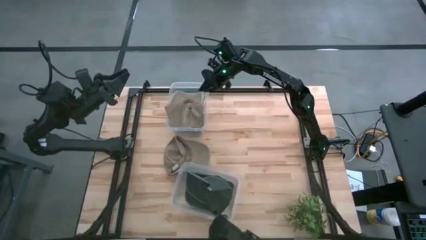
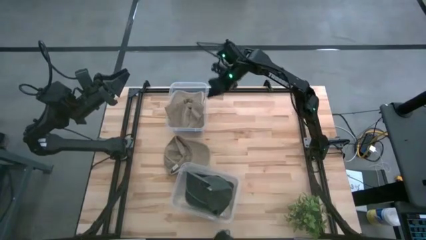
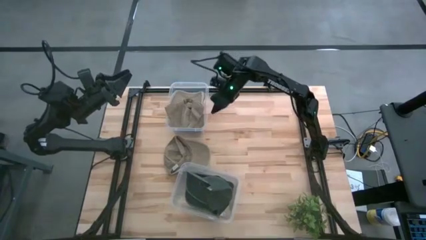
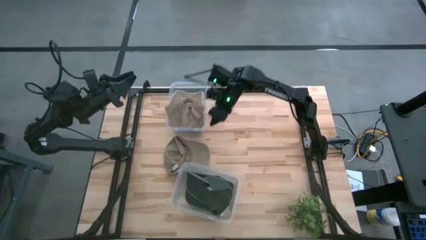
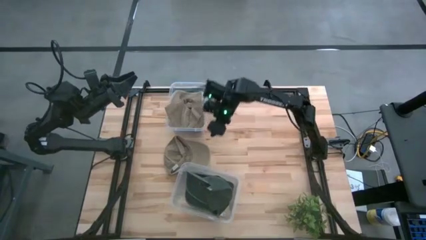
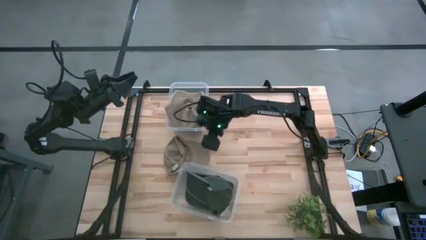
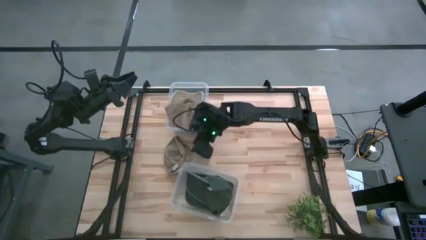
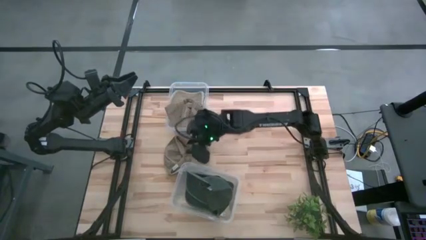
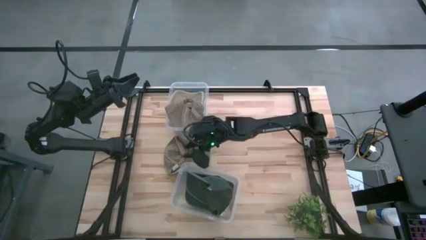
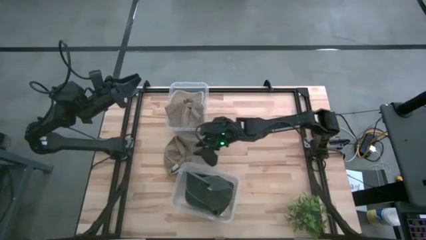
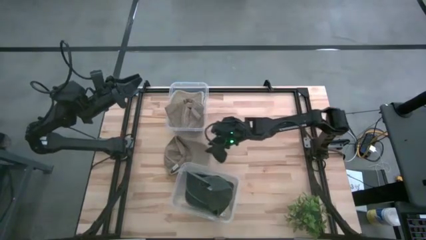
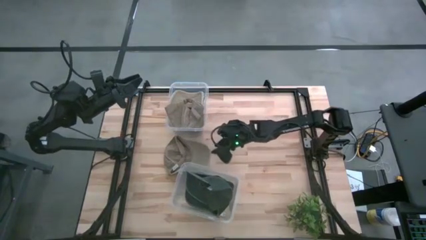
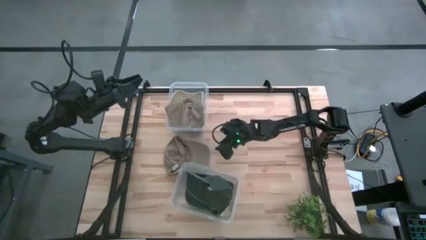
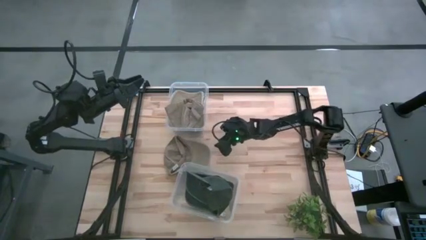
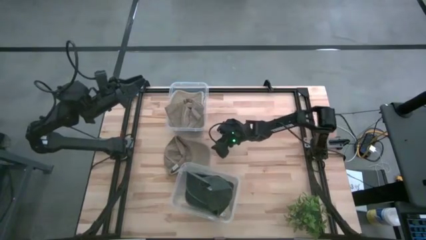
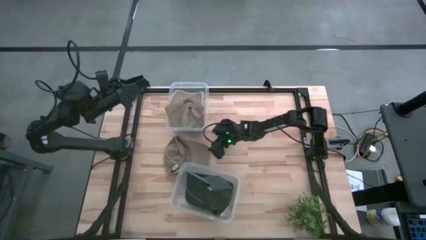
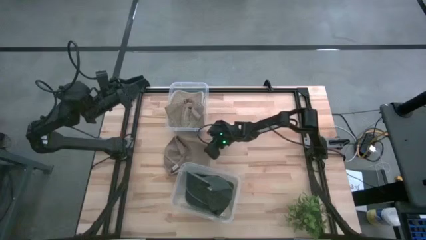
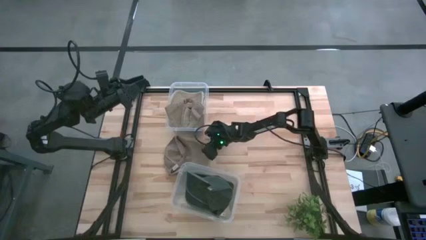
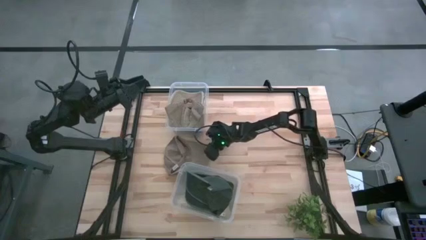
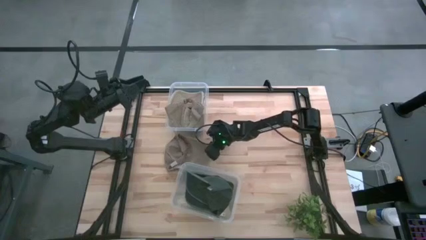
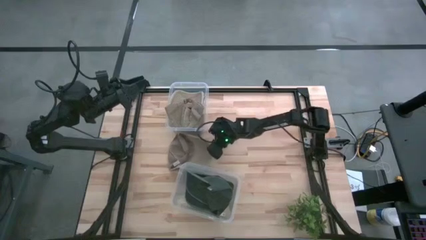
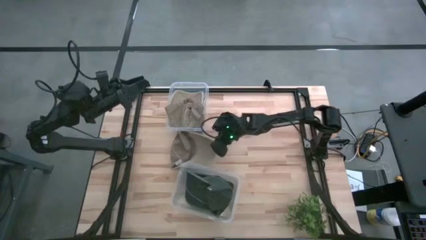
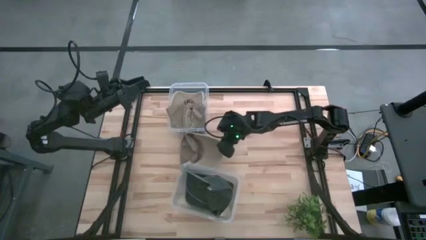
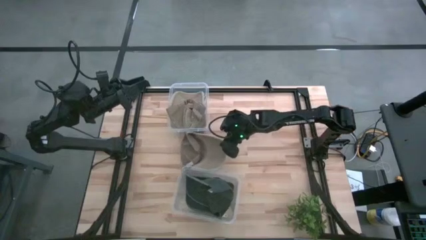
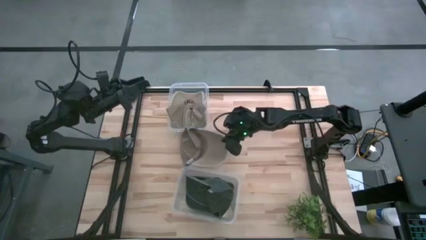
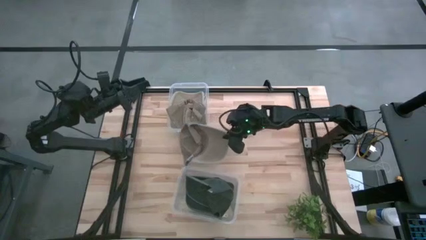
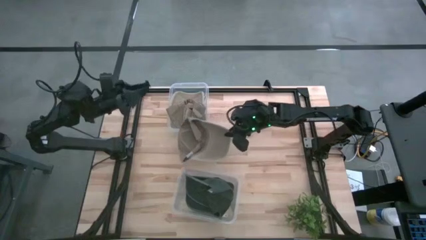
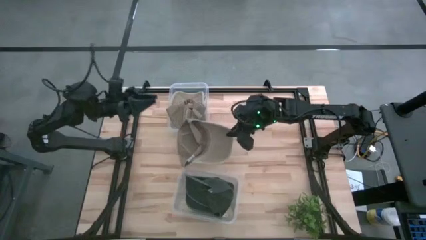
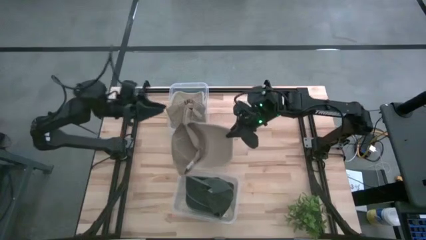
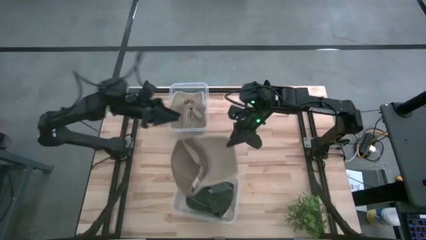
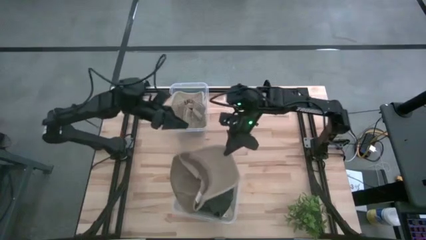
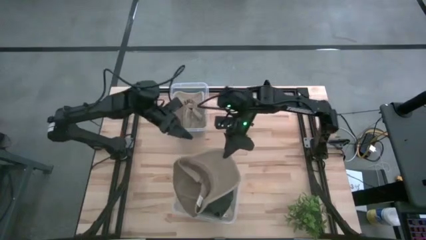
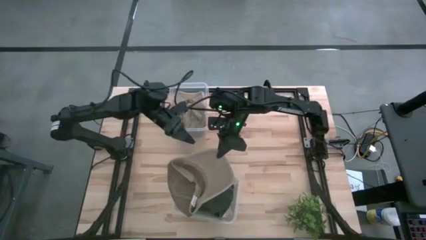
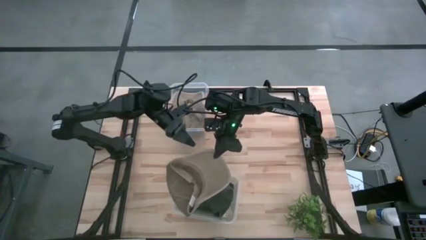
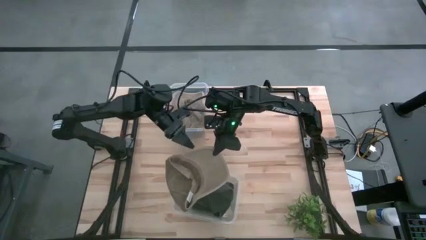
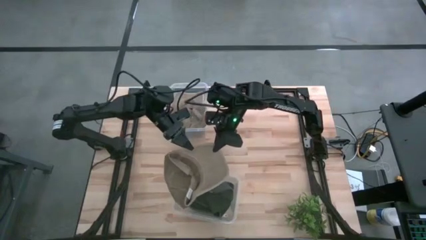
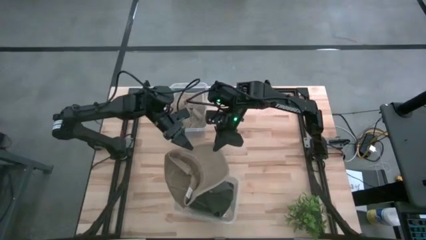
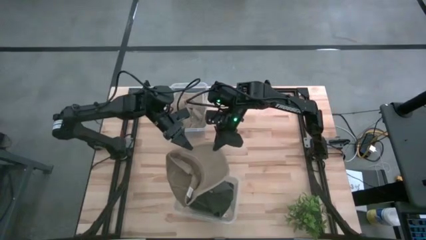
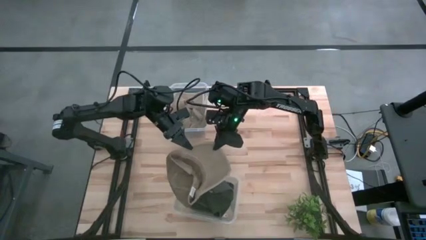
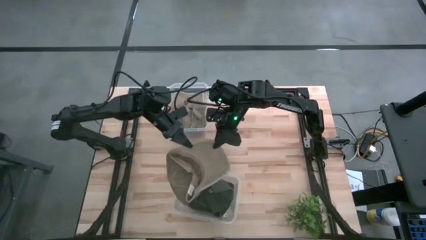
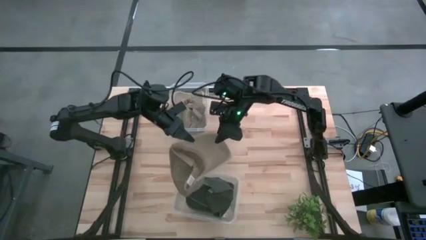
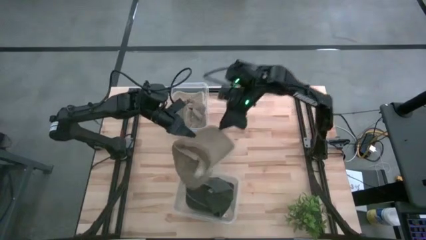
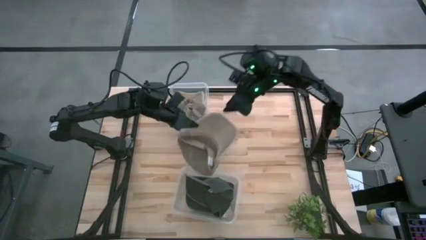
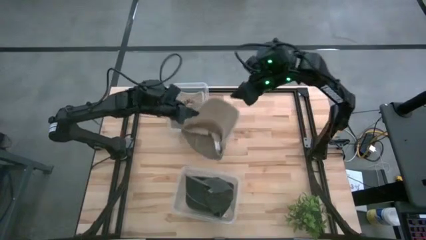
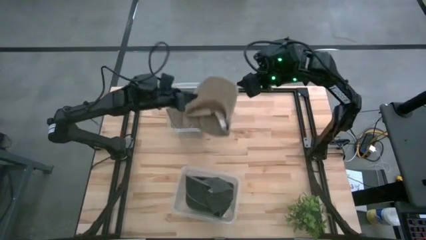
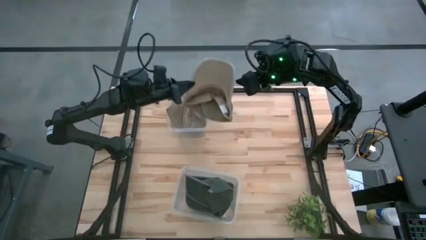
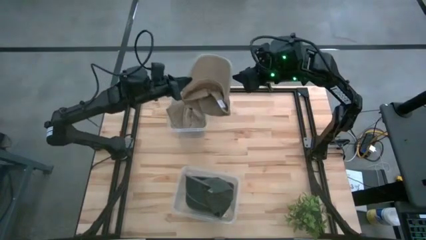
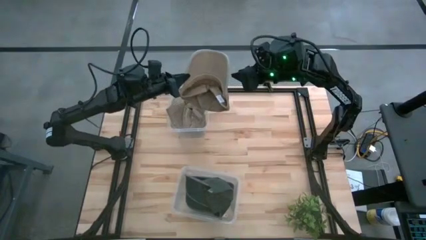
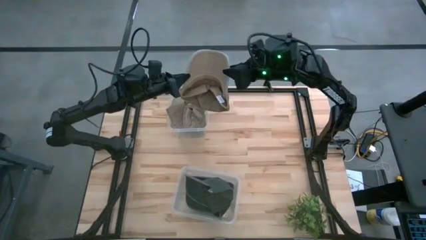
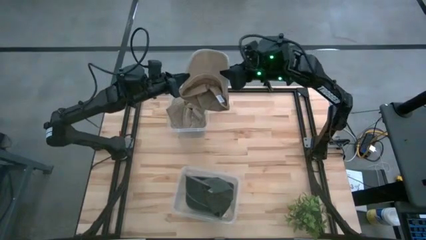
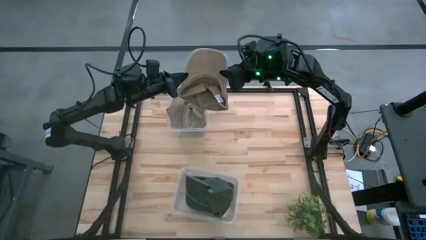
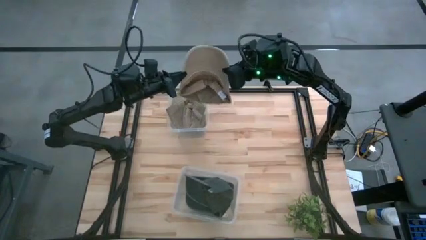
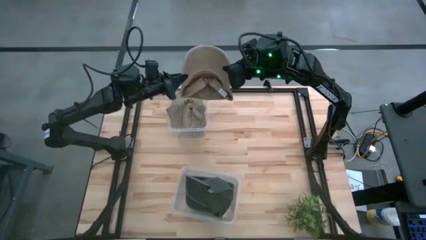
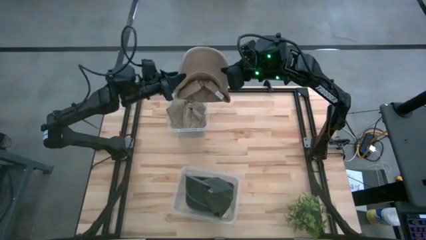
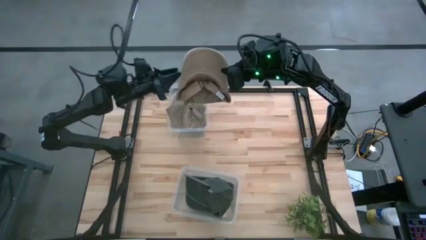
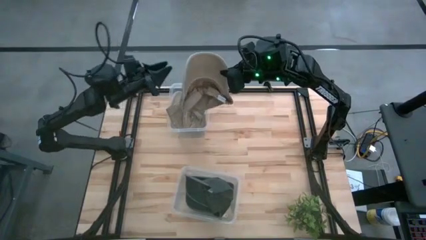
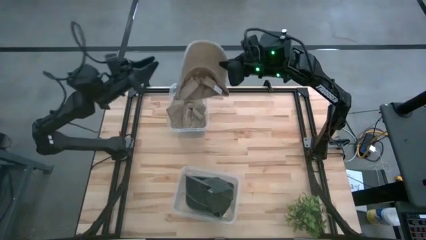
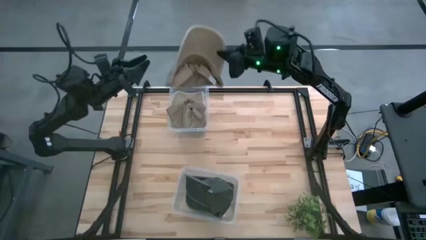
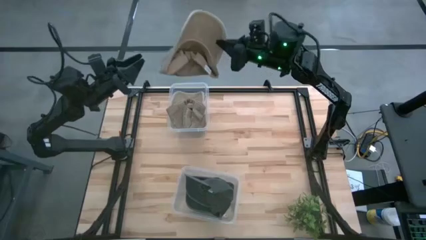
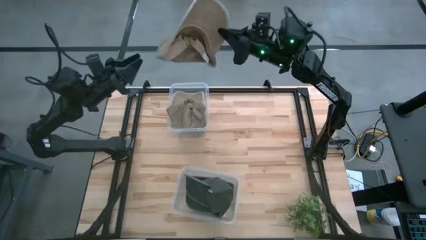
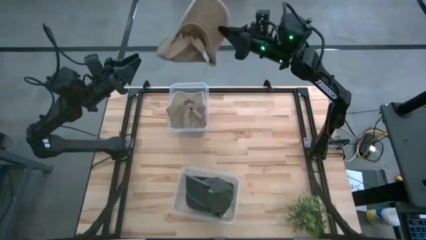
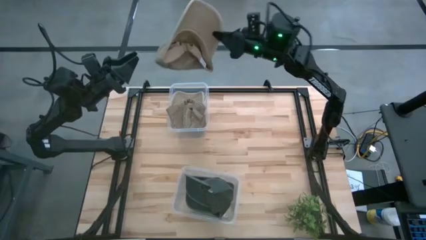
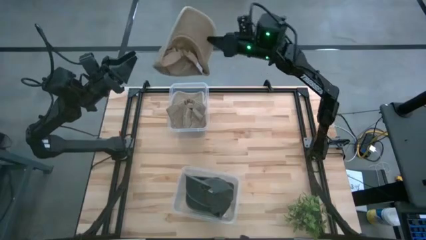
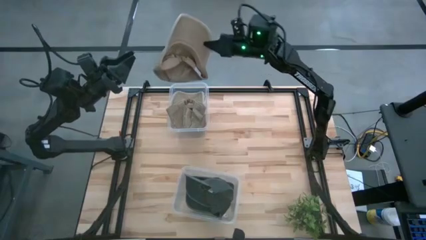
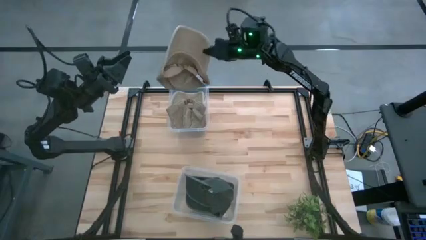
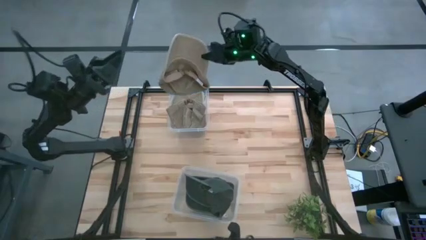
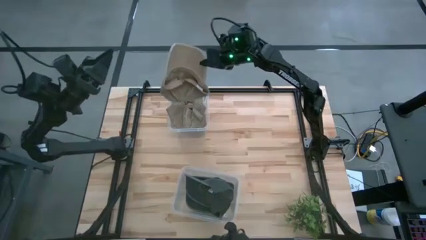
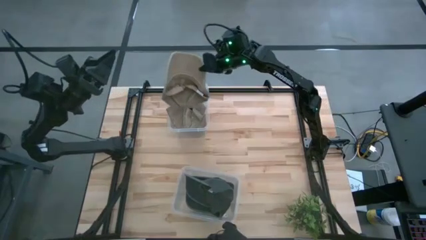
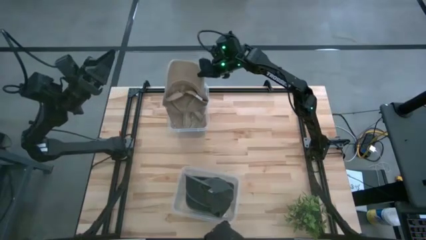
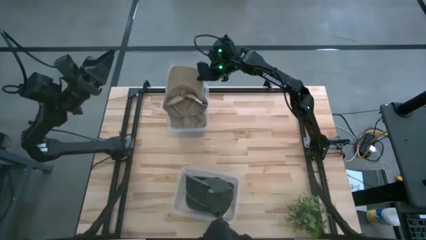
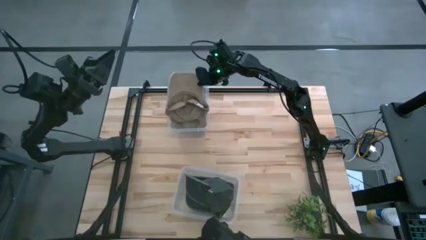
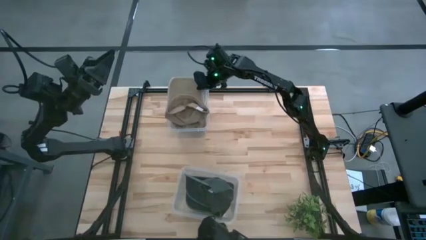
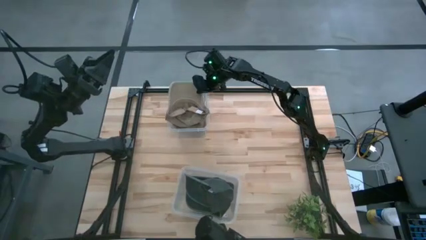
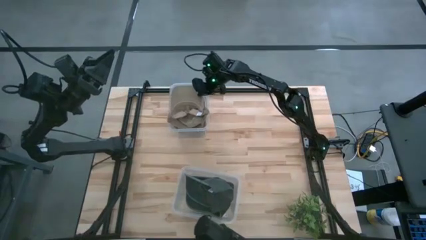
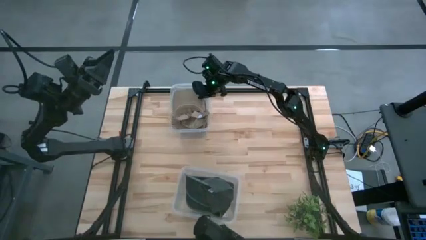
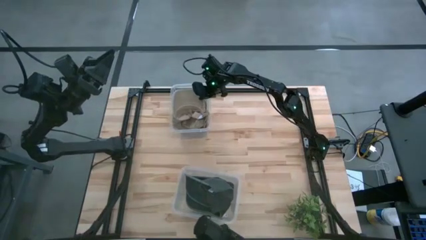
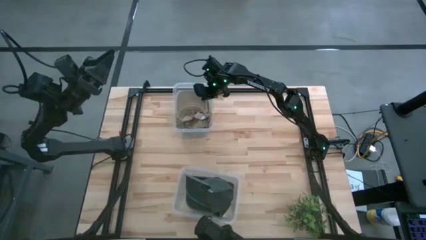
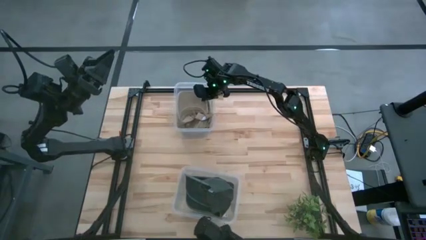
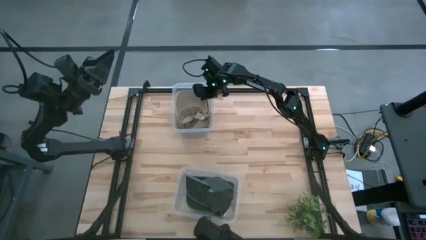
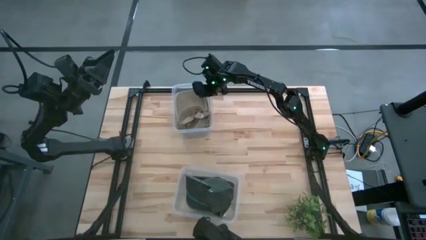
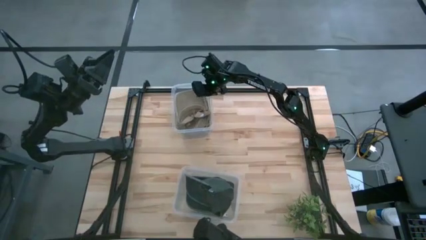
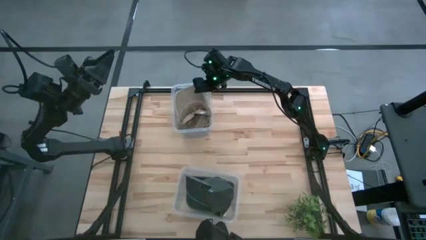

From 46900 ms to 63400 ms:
Task: Pick & Place hat
Put the brown cap into the top transparent bin

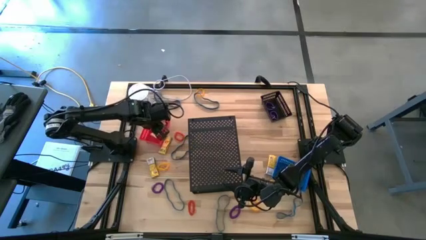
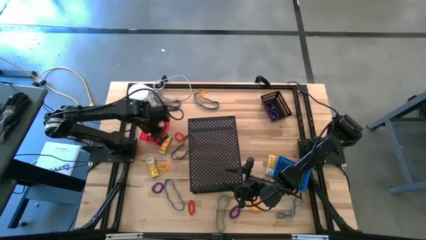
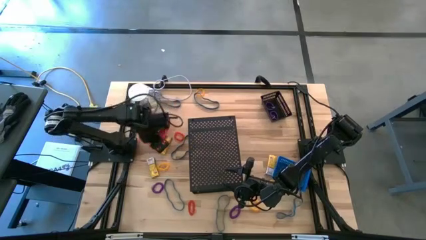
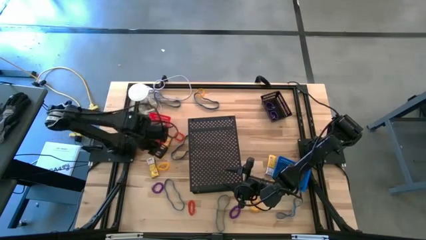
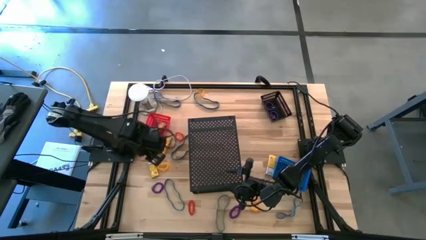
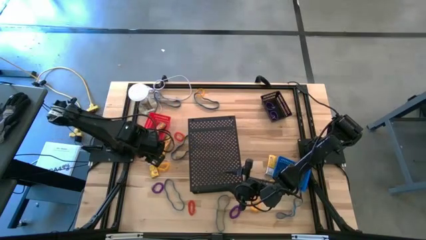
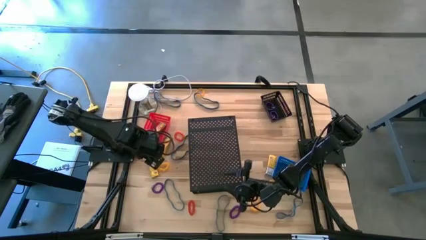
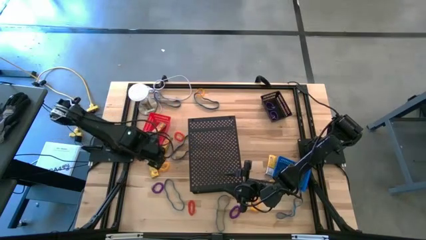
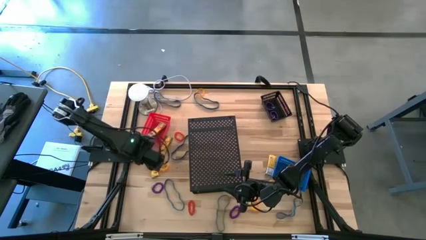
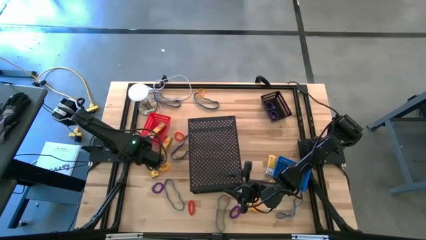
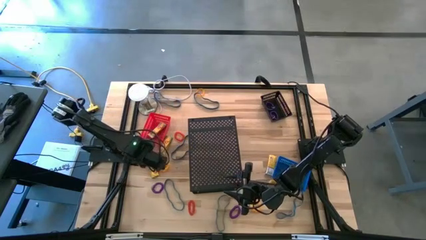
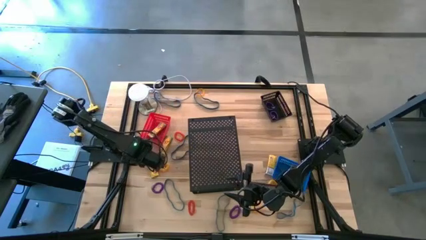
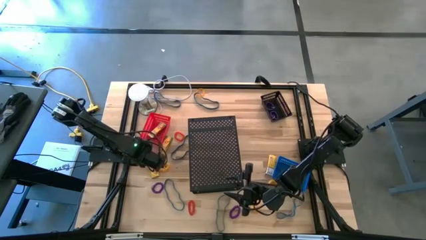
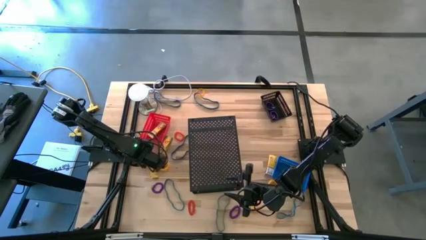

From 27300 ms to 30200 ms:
Task: Pick & Place Office Desk Supplies
Put the yellow crayon box into the red bin
